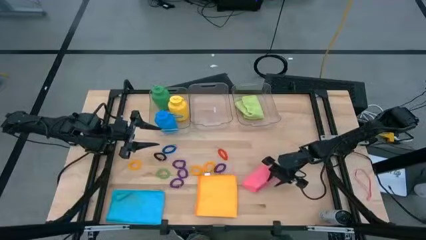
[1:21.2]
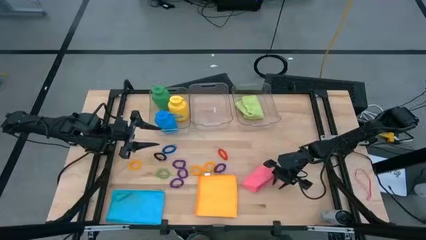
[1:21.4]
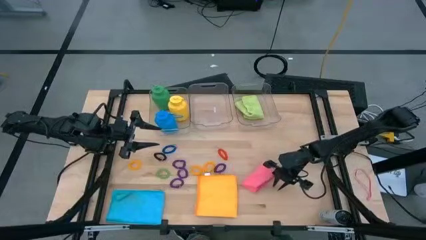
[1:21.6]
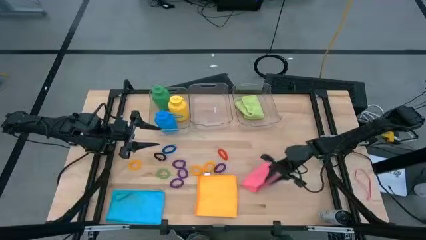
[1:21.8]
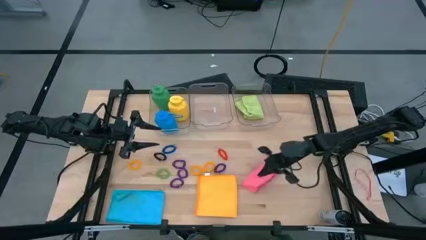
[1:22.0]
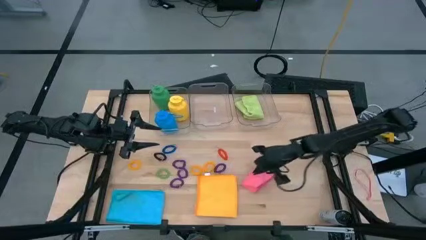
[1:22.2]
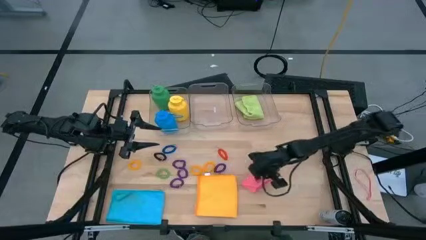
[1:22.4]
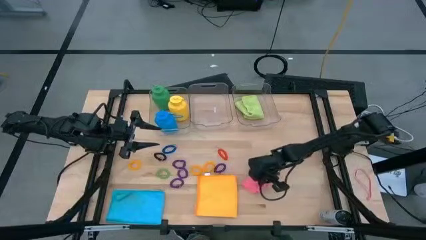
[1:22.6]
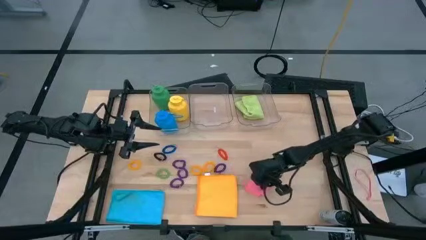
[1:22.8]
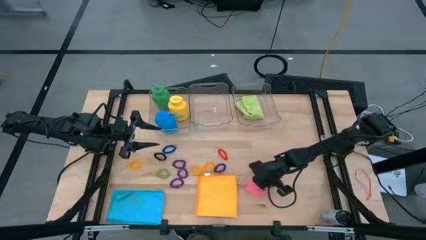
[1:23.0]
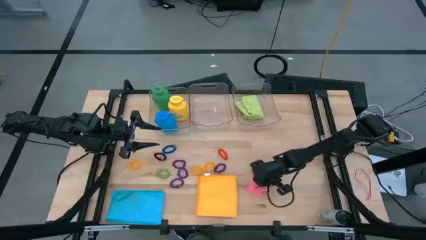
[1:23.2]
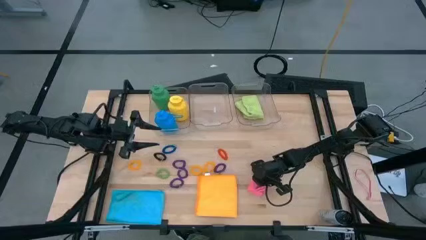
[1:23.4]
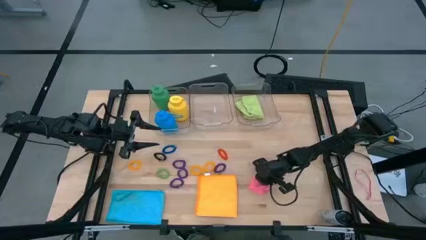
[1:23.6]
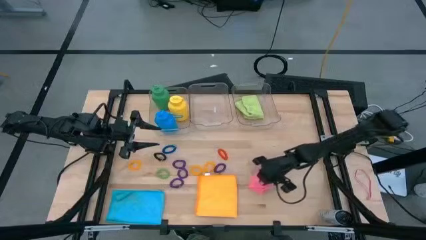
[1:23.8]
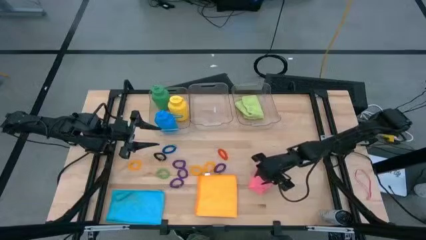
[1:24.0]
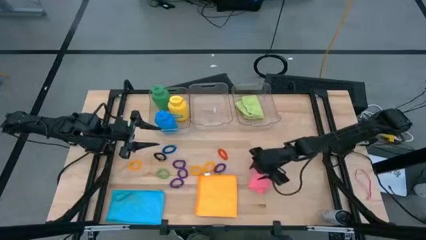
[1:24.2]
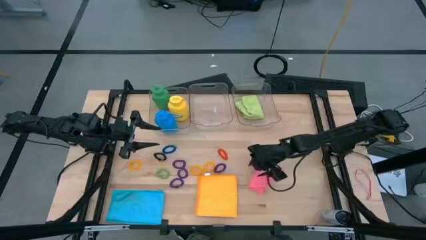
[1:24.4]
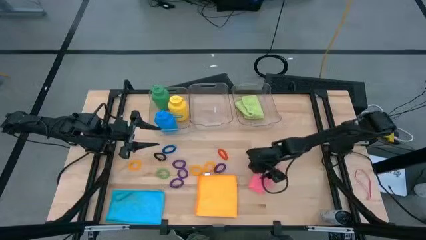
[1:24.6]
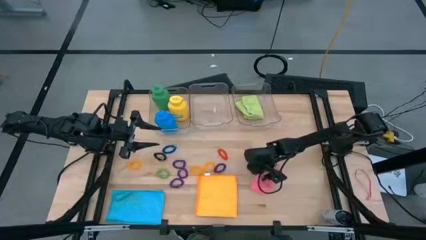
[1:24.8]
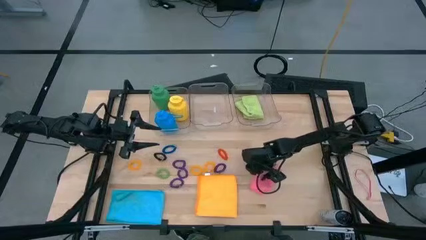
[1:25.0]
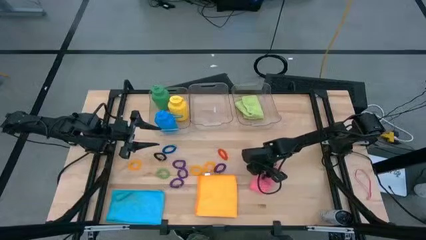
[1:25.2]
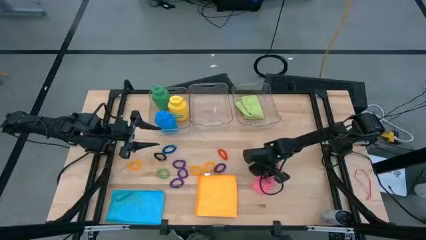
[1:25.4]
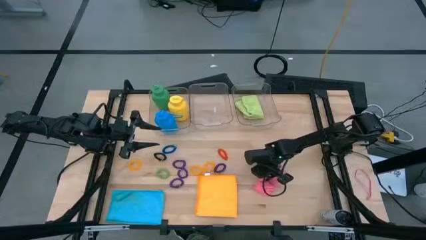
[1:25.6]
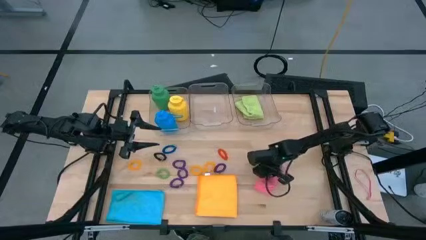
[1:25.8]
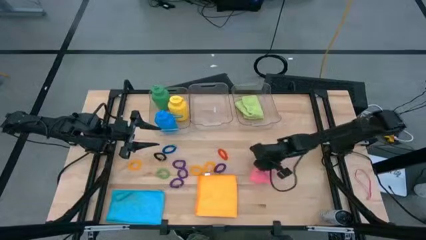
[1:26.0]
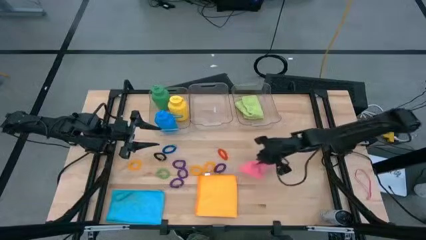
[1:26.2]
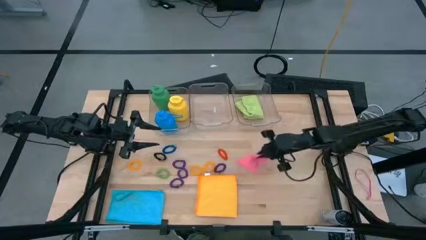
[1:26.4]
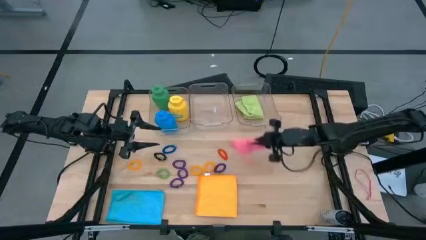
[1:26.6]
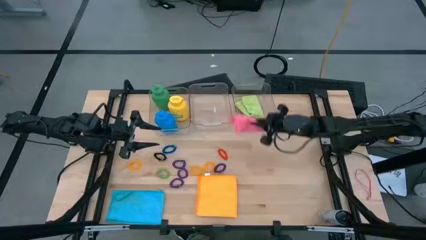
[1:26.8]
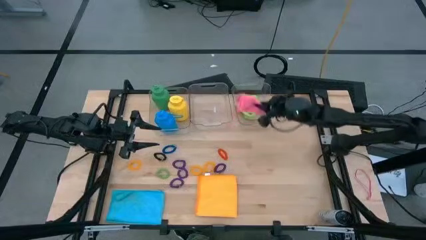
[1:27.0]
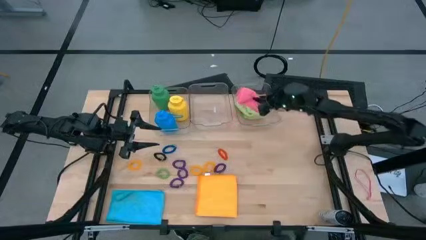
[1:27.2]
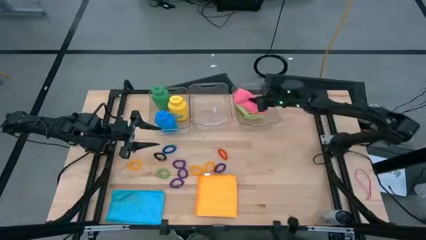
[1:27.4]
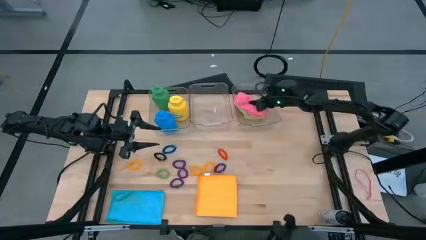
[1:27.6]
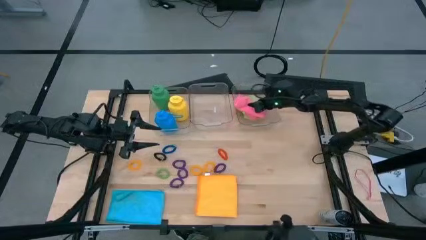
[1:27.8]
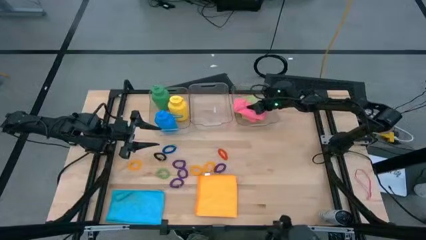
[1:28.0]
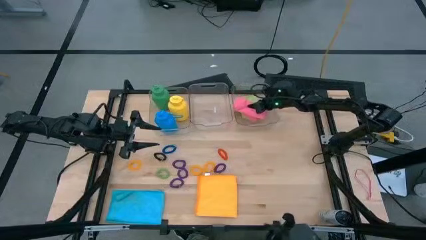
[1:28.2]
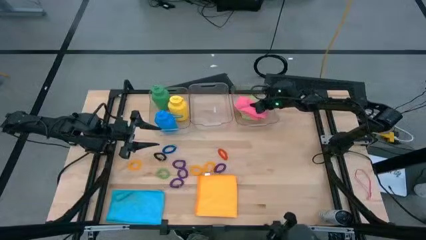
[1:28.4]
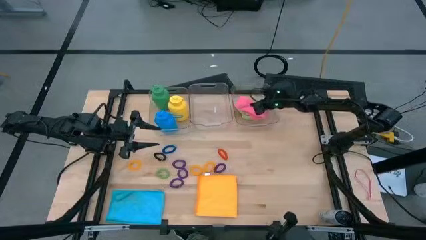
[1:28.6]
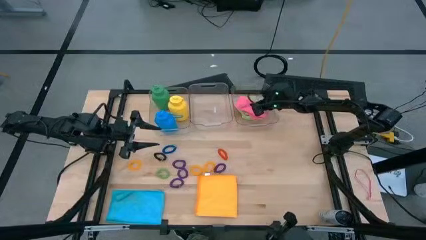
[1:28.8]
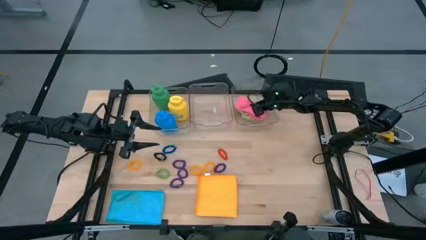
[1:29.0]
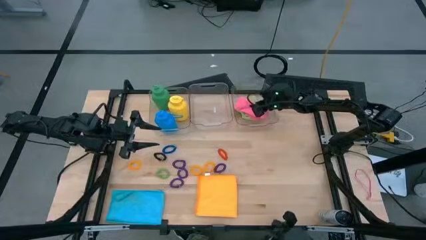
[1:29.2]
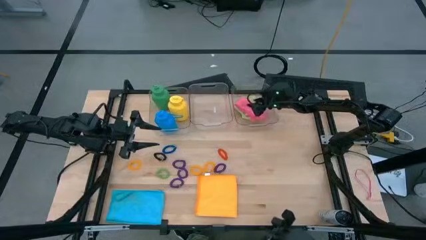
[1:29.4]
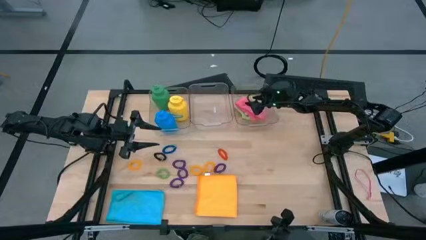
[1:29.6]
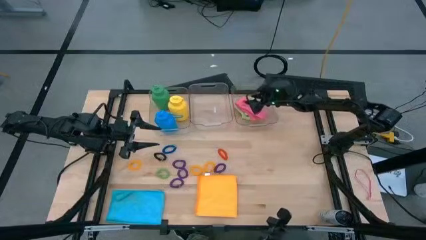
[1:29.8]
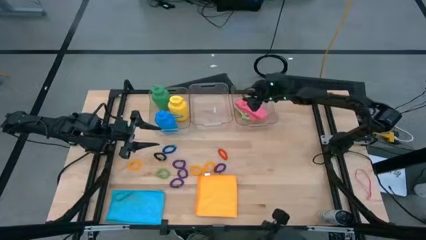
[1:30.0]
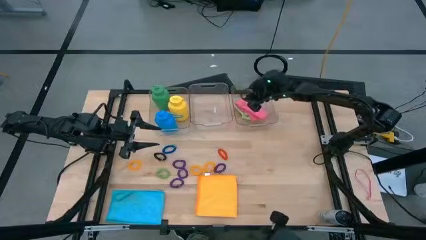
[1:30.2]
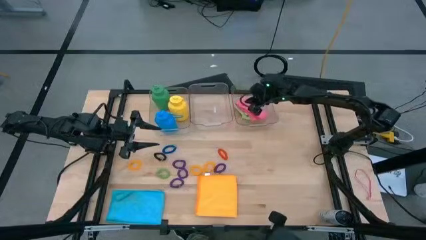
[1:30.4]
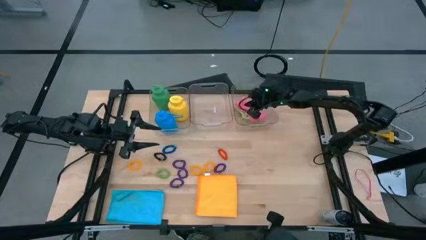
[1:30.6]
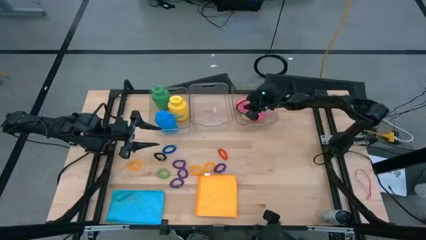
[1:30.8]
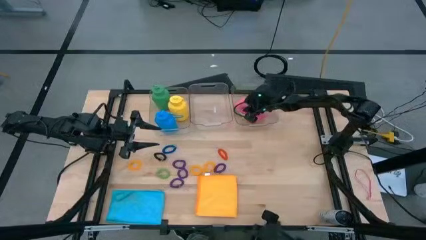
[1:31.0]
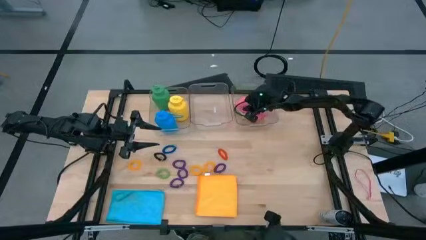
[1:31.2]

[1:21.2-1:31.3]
Task: Pick & Place Sports Items
Put the pink cloth into the right transparent bin

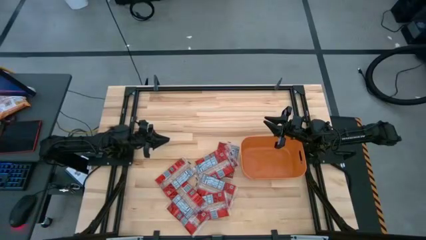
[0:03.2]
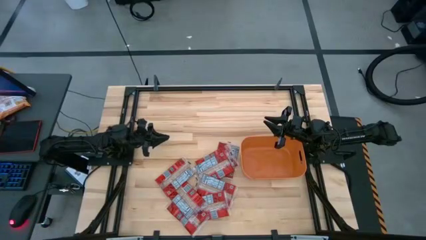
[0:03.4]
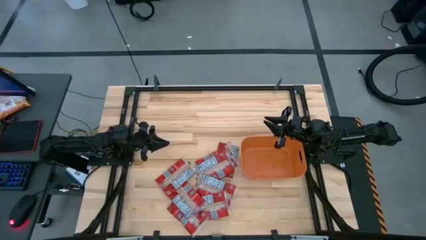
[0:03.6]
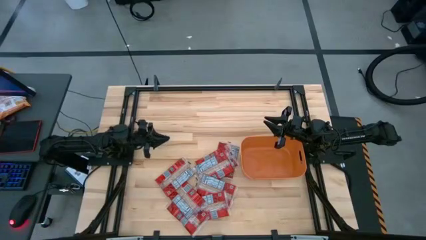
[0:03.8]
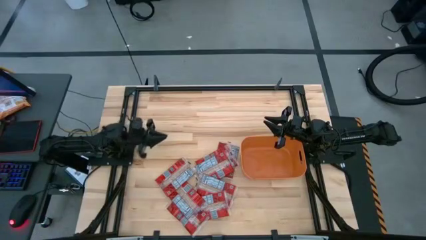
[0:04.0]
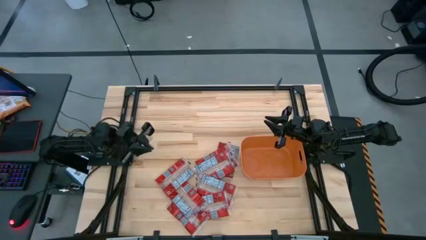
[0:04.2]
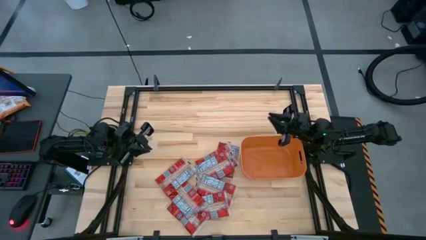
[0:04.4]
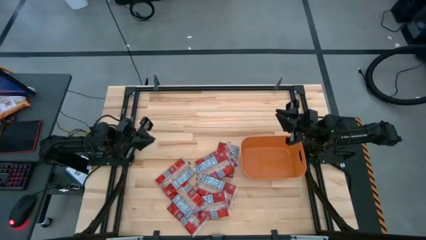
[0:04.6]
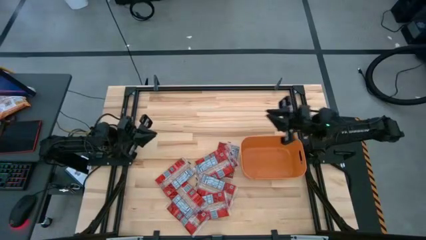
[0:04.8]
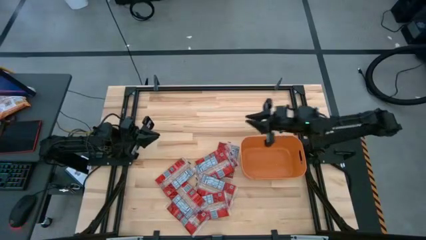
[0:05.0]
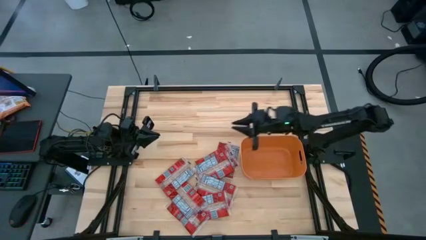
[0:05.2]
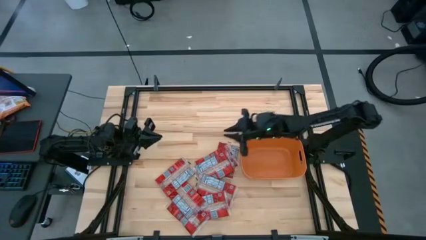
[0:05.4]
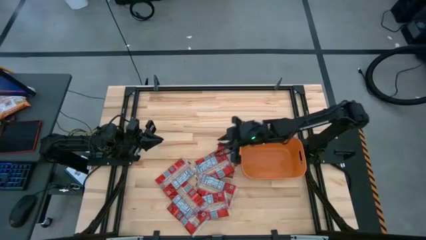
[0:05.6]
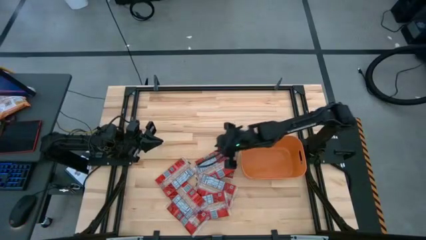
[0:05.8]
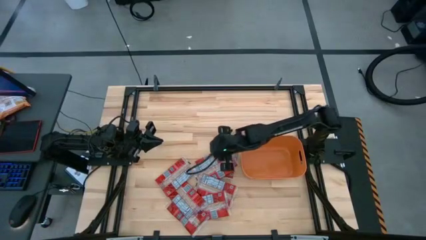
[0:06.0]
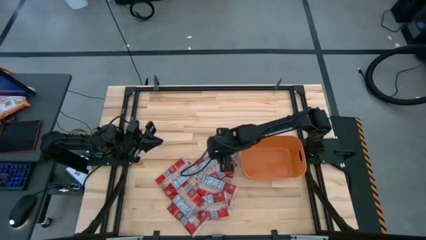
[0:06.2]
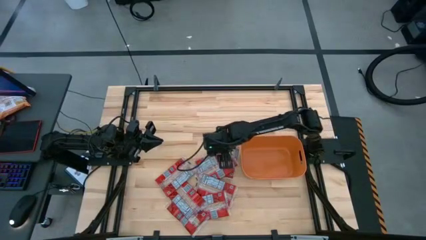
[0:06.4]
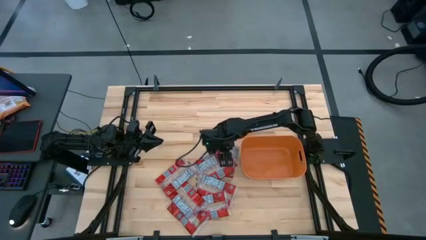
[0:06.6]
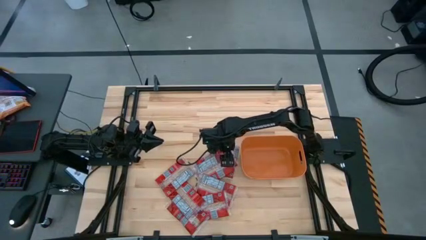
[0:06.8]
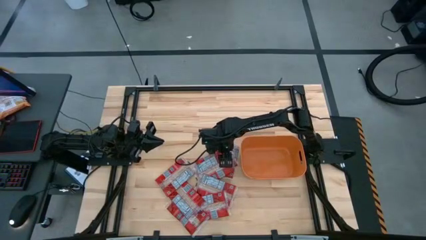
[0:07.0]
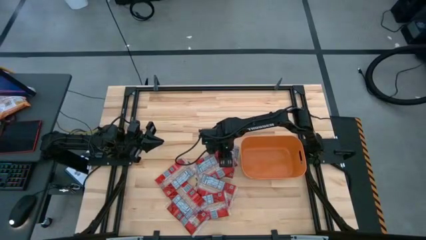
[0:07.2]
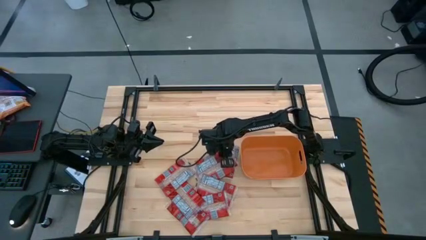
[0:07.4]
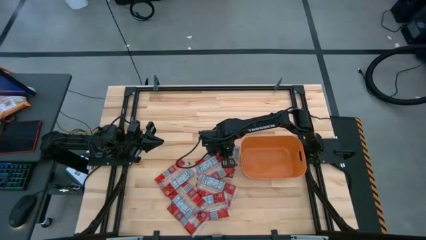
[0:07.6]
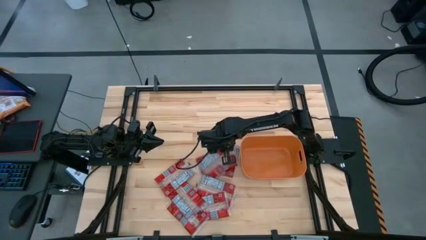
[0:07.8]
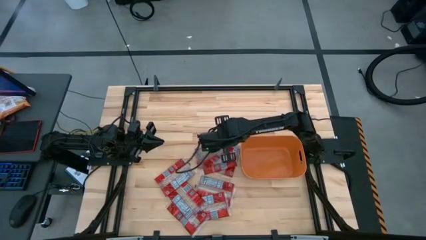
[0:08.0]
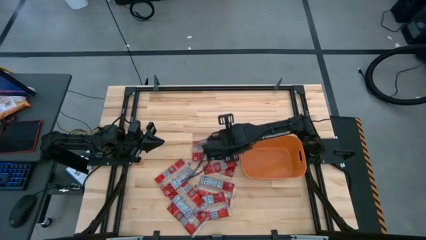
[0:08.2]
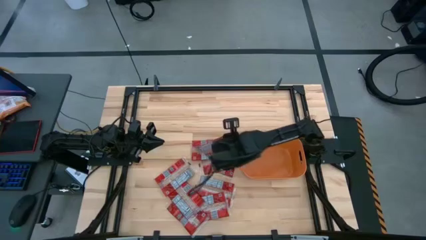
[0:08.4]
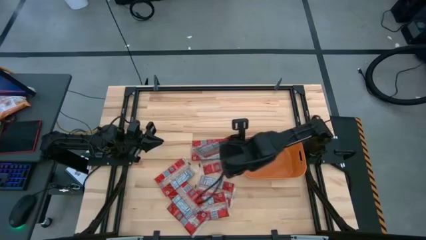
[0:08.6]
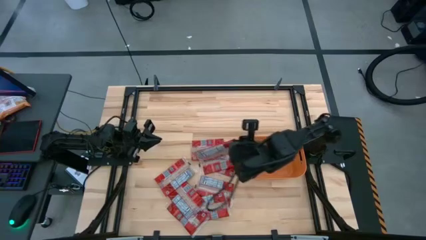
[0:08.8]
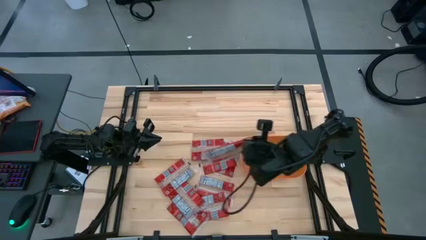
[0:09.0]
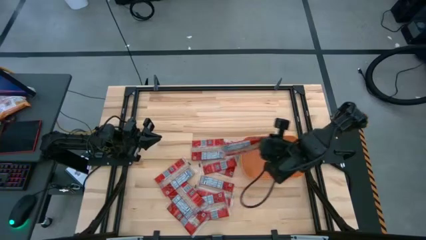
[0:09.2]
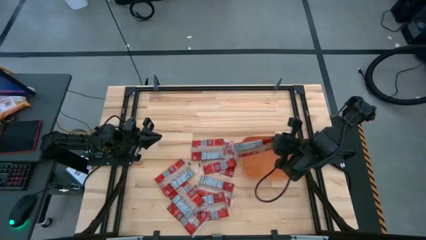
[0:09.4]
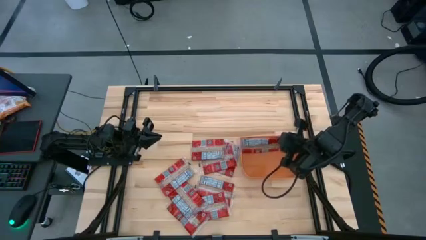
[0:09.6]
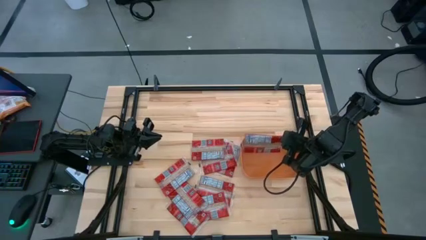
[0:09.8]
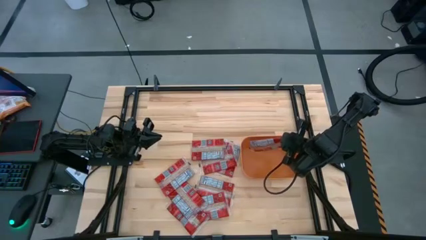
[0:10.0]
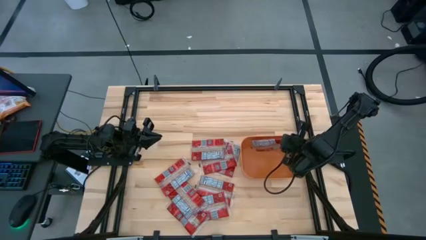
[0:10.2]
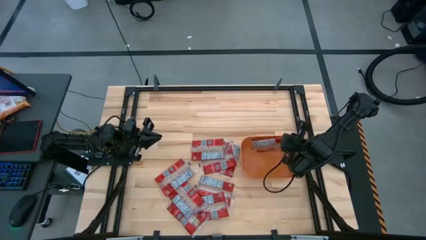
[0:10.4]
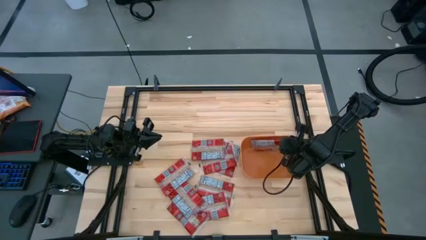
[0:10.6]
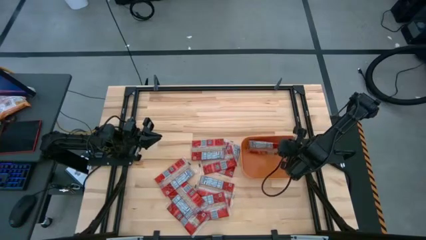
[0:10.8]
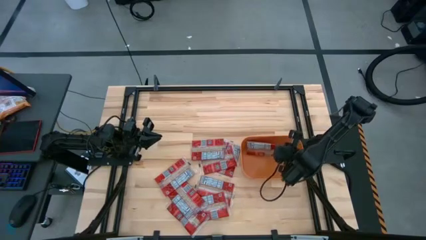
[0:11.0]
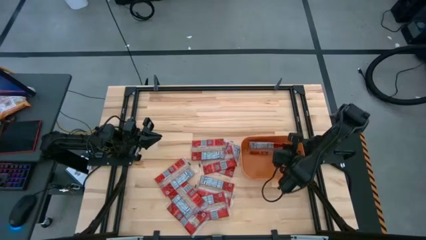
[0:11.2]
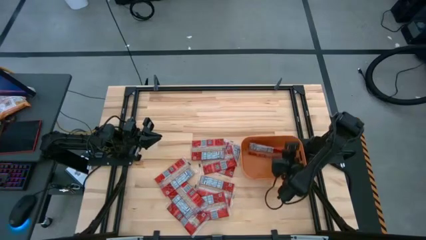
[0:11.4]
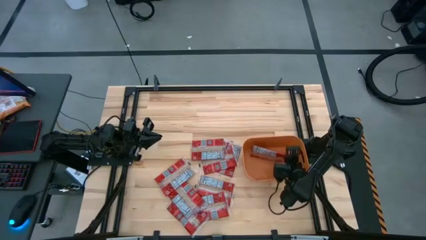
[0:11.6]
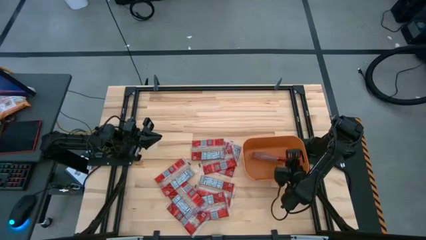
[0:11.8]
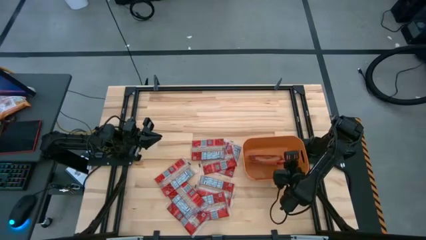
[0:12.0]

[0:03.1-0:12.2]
Task: Sort popcorn bags into baskets
Put the popcorn bag into the orange bin
